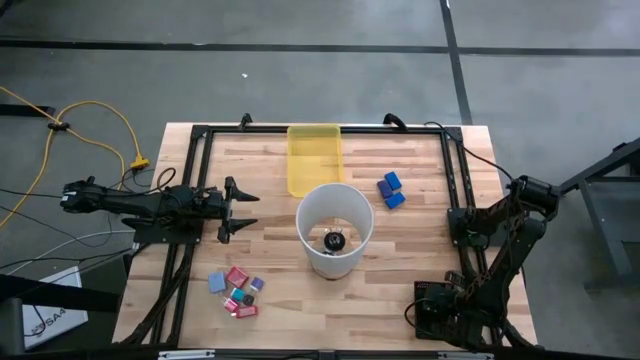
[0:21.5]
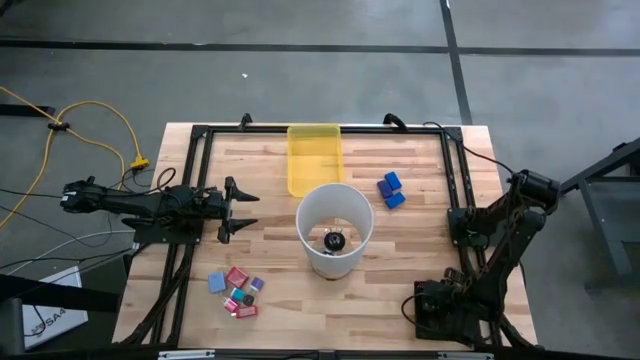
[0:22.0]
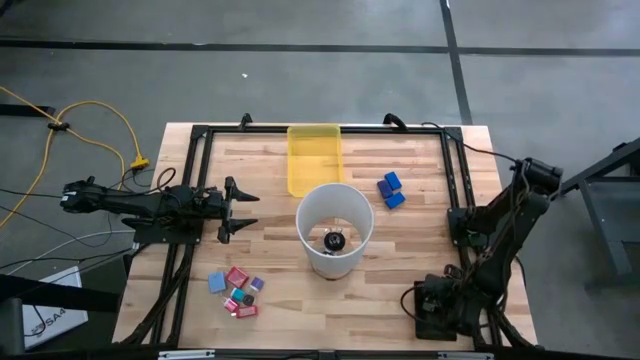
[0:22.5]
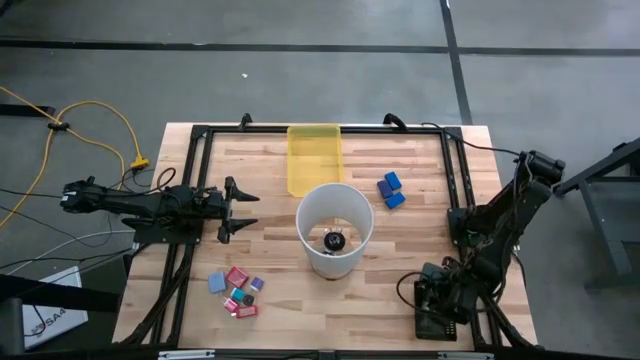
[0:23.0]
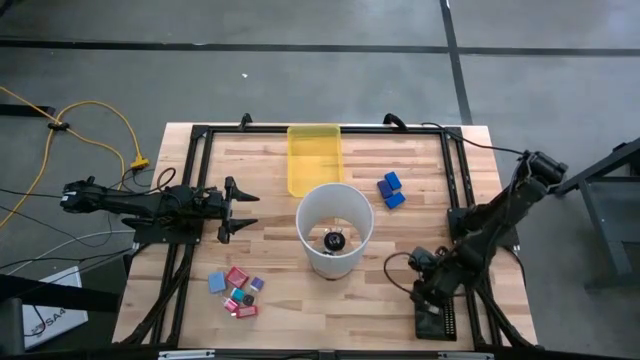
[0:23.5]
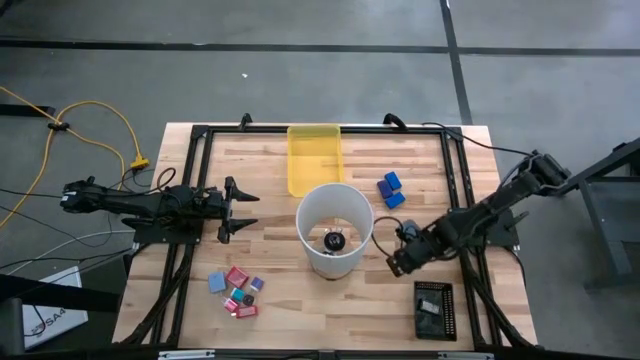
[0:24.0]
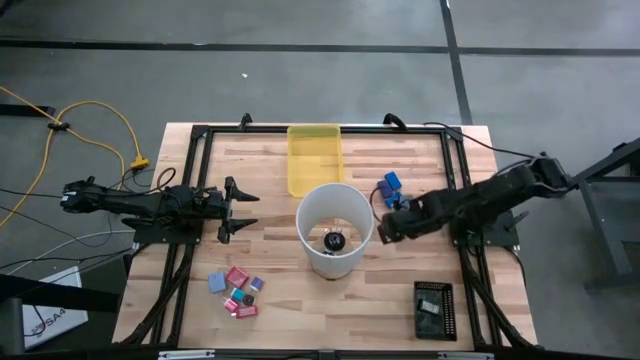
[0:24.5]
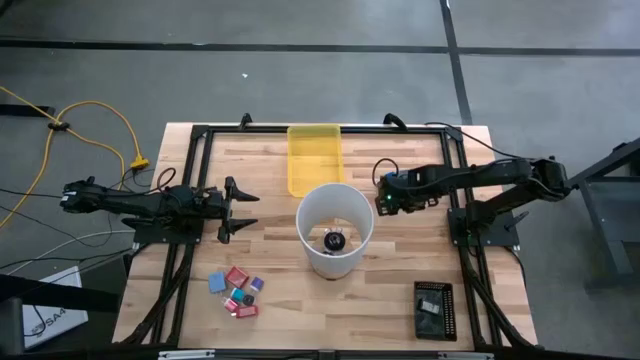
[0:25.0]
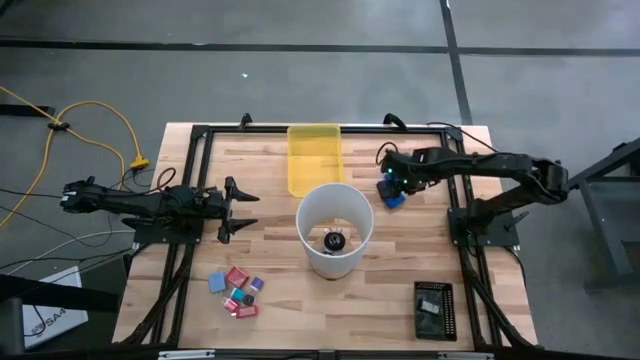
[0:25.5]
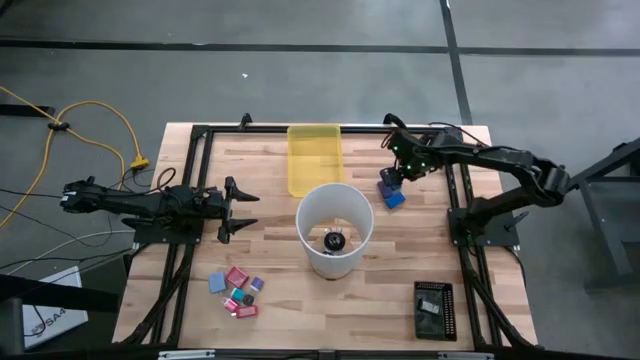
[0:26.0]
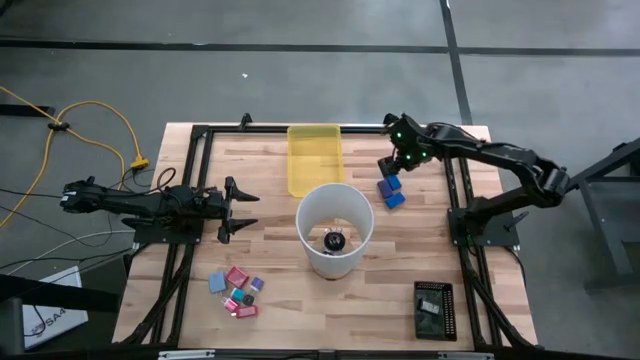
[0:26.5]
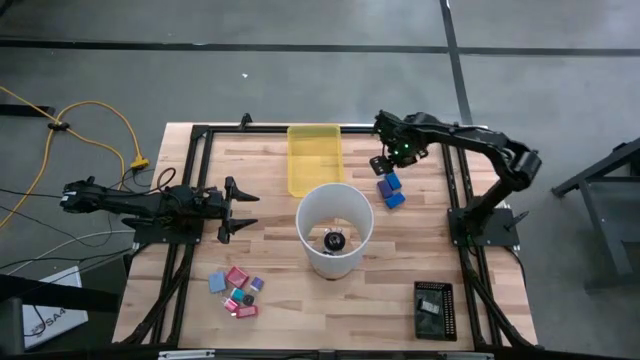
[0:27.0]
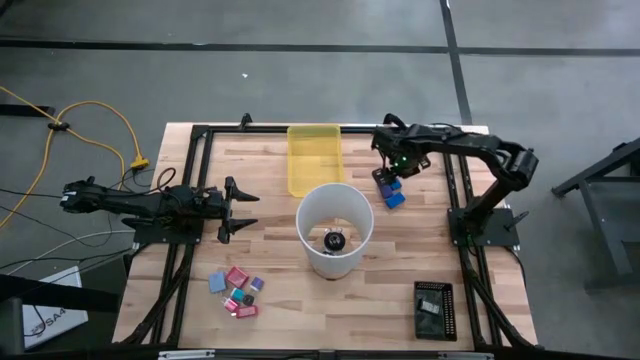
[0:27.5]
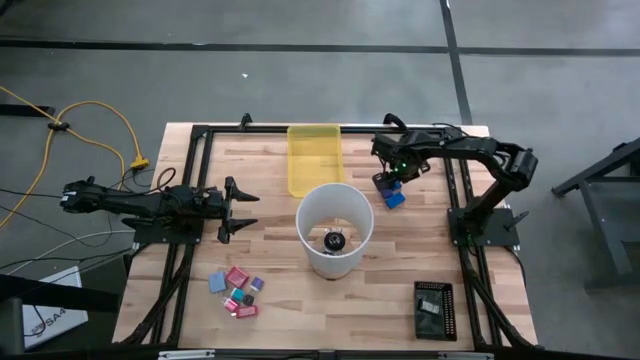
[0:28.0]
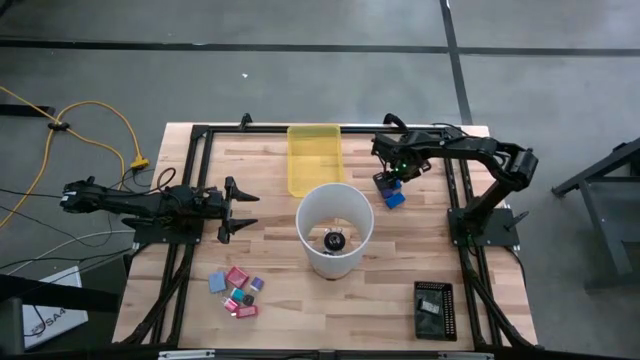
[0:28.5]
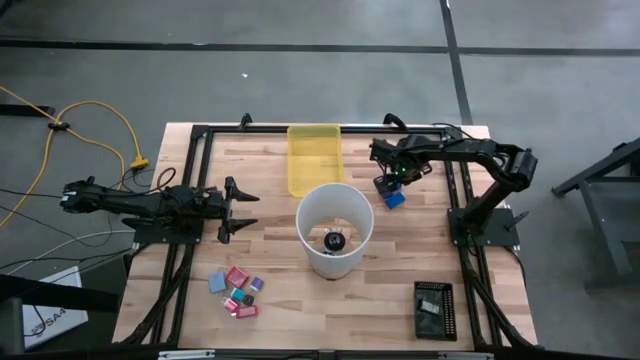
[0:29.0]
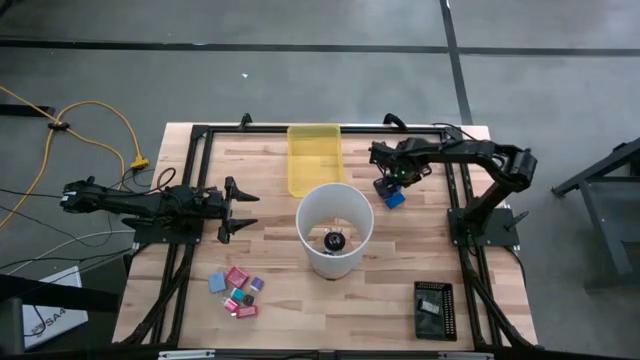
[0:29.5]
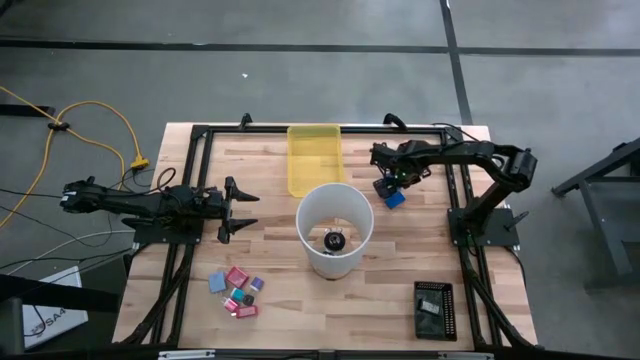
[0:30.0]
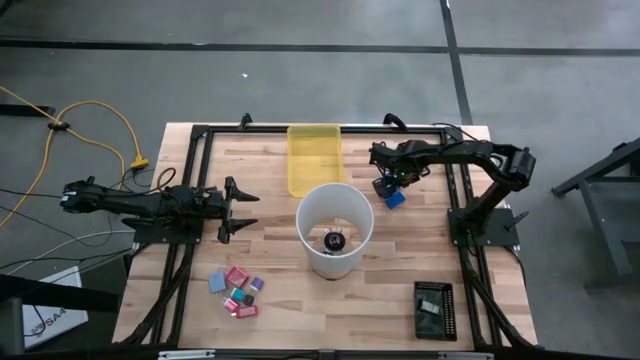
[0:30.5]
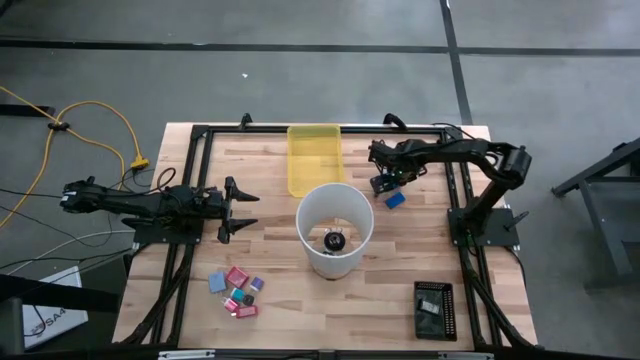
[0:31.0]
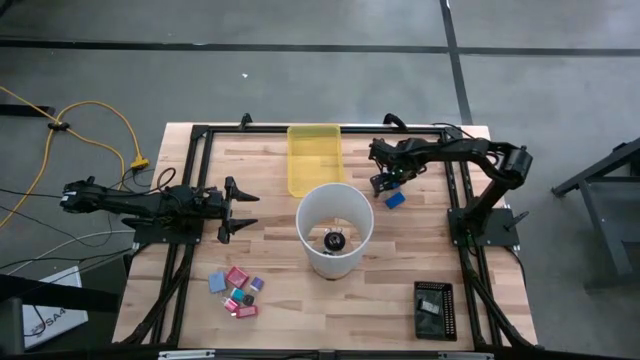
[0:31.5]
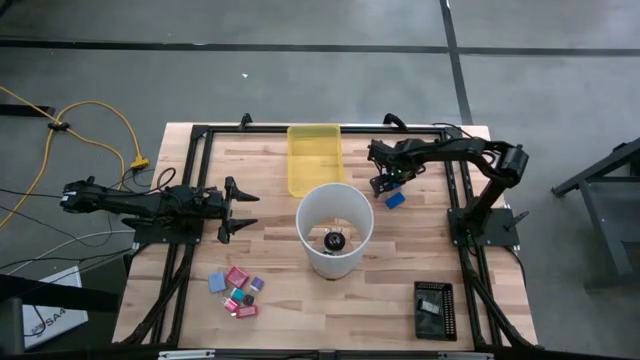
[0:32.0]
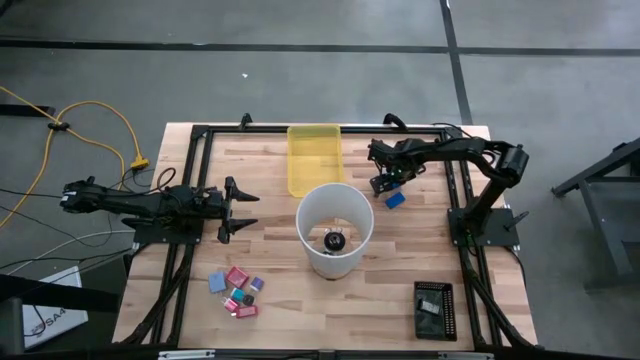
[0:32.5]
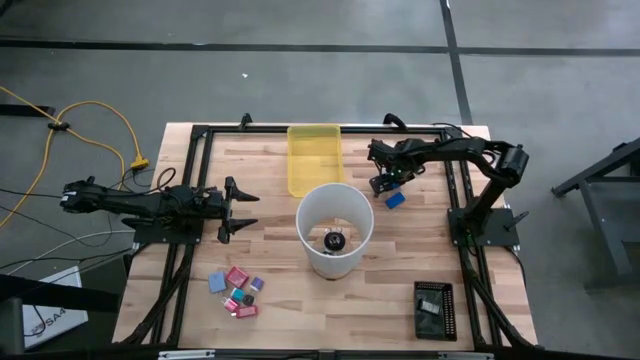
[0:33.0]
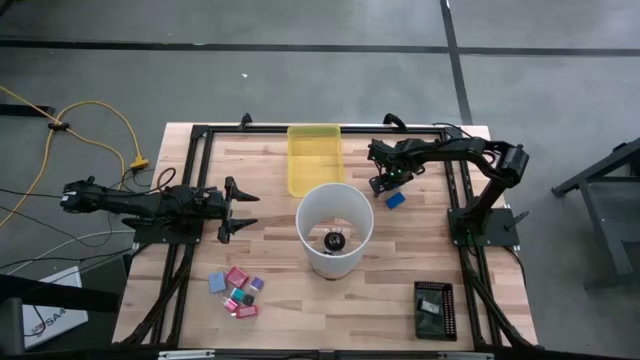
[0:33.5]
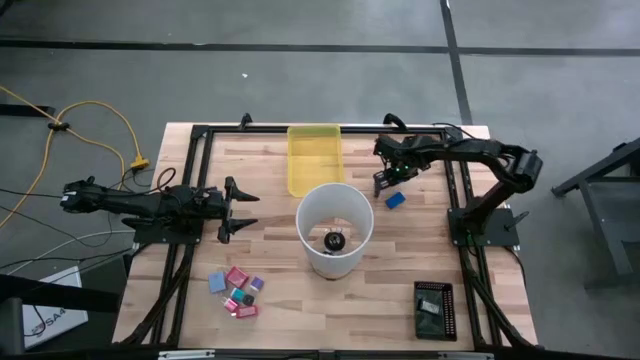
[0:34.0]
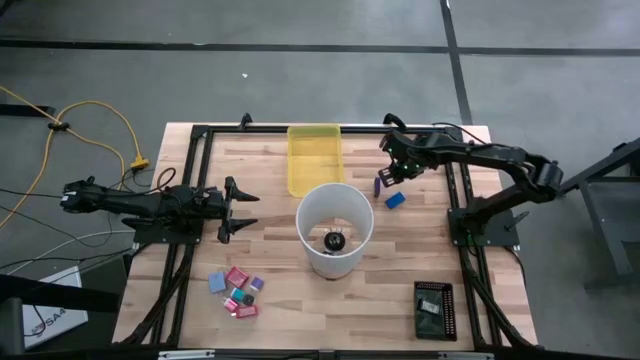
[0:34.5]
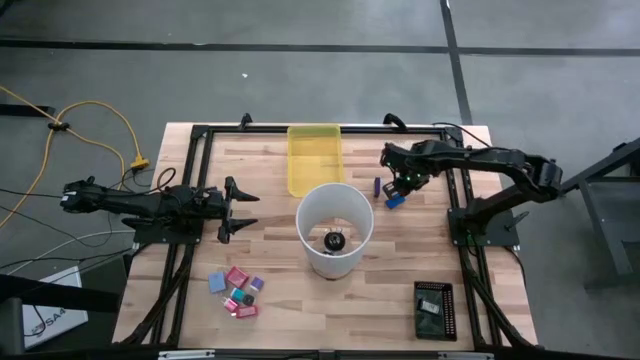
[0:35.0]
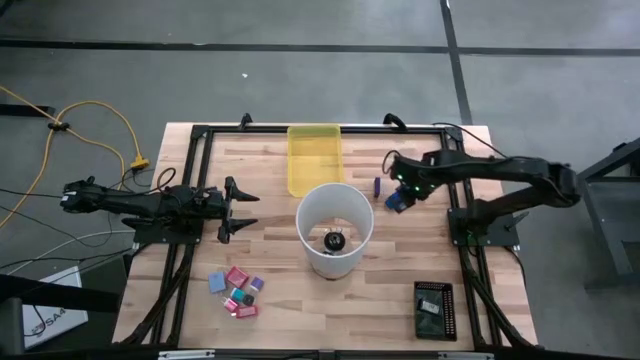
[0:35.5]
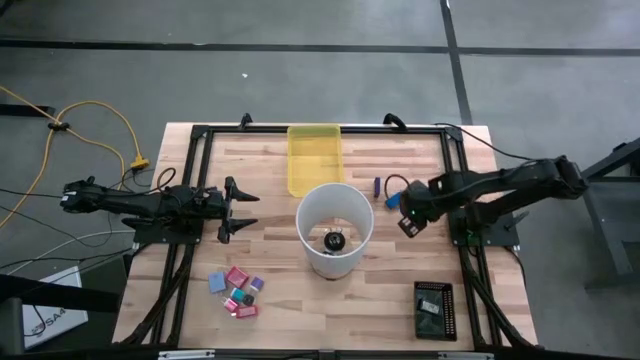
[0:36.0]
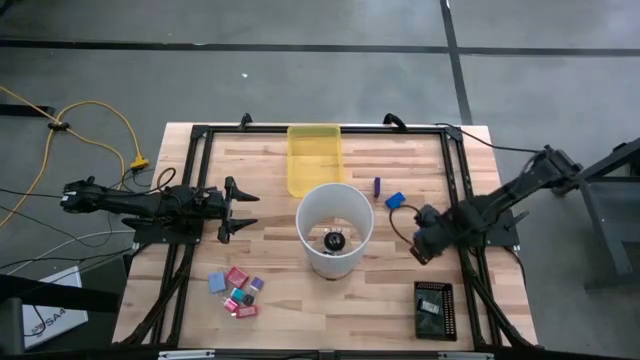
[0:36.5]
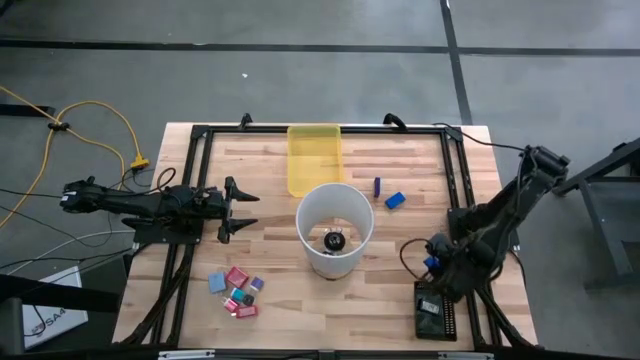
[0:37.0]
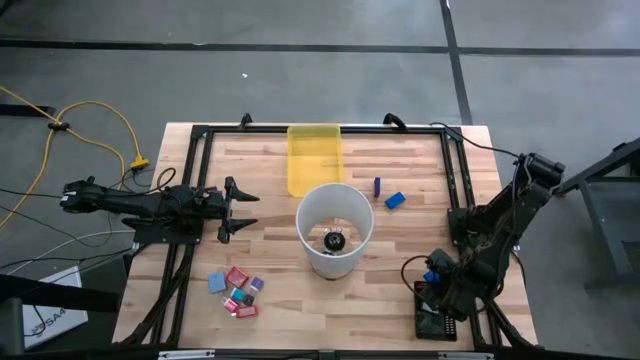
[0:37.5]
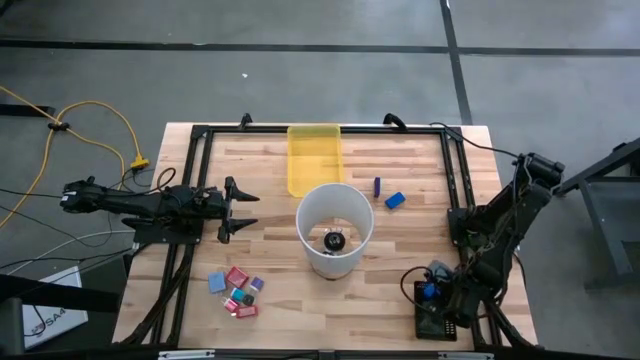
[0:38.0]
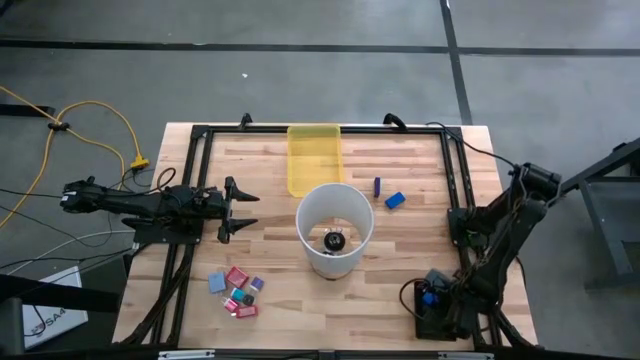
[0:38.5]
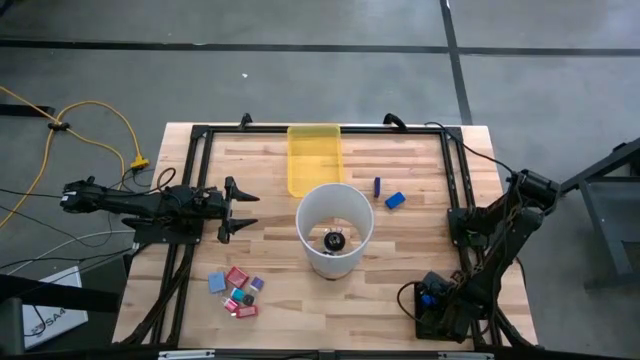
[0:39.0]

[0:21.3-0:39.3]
Task: Pick & Place Office items
Put the top blue timer into the black bin
